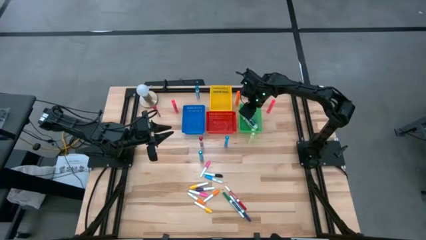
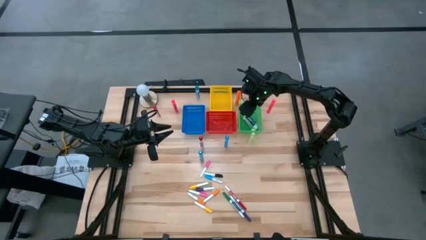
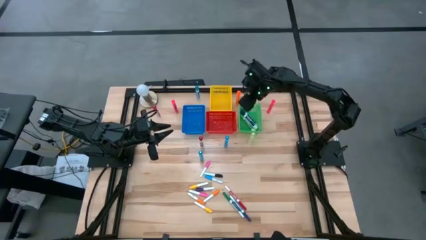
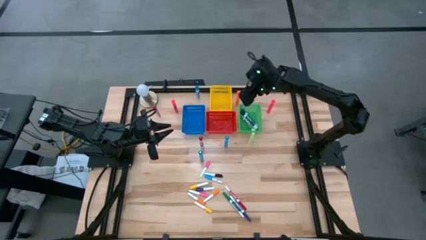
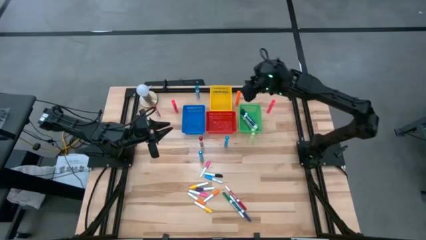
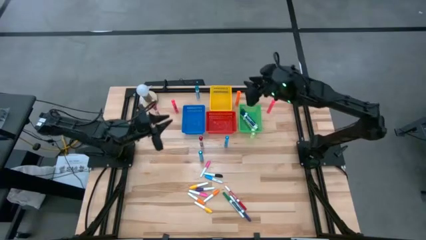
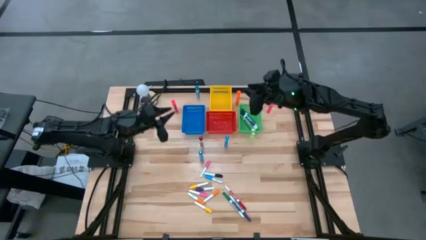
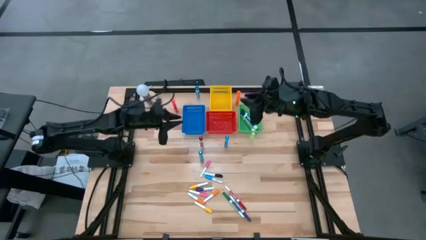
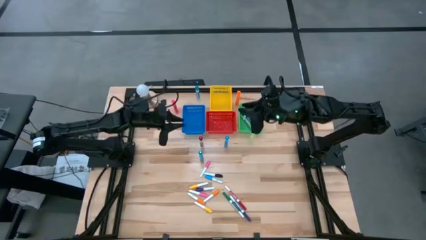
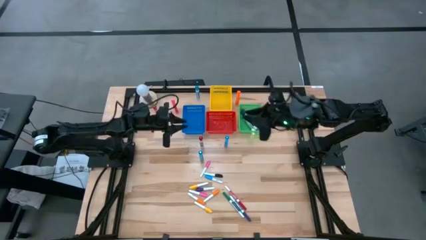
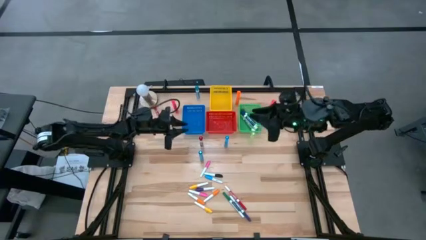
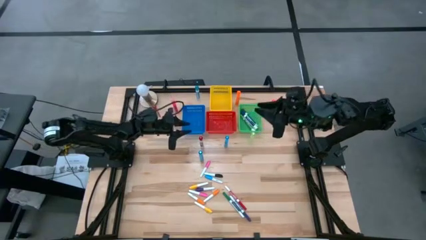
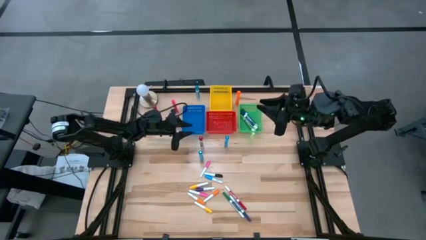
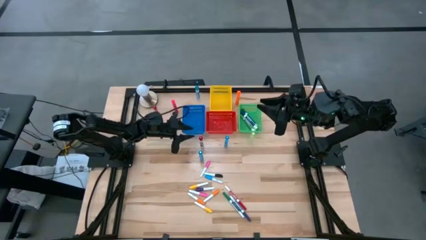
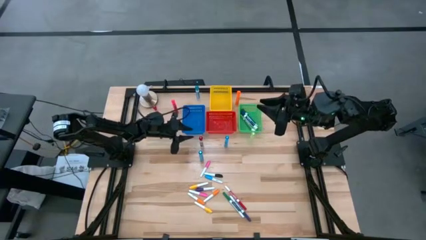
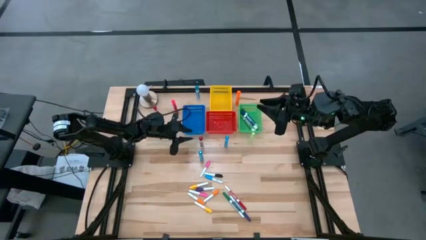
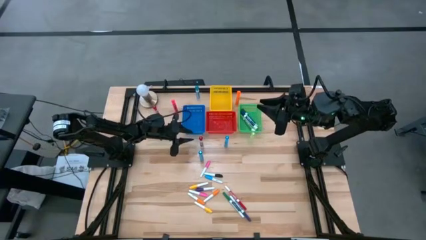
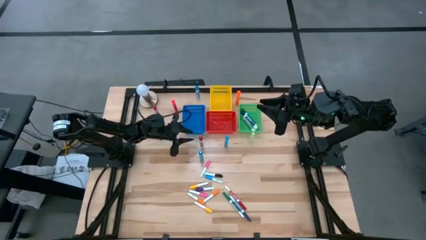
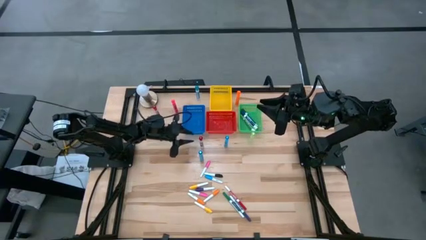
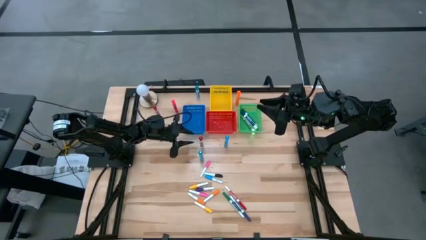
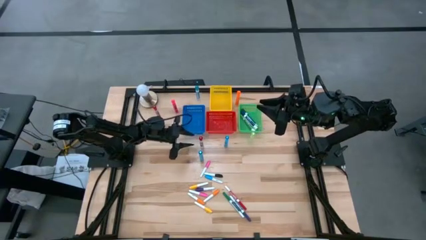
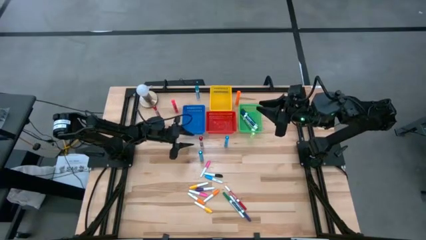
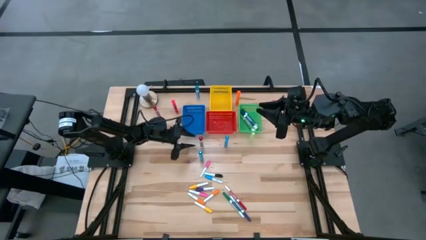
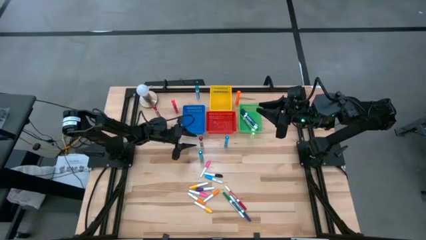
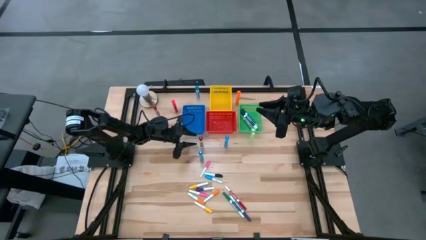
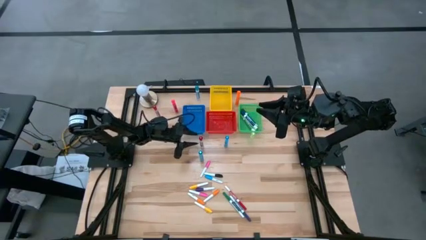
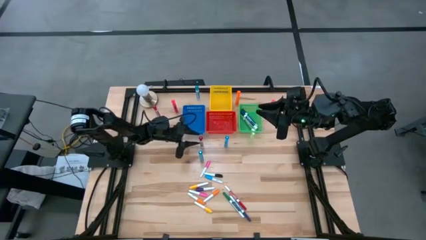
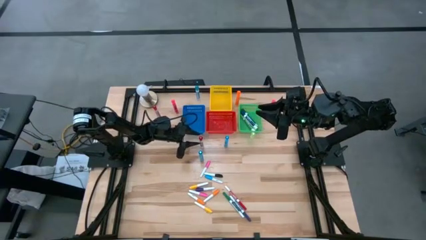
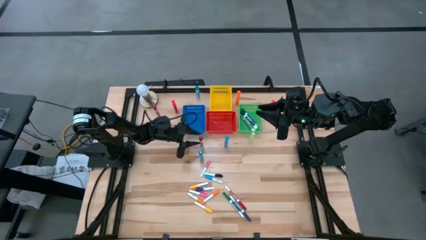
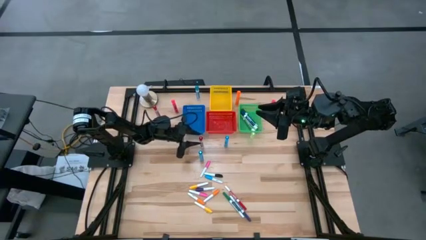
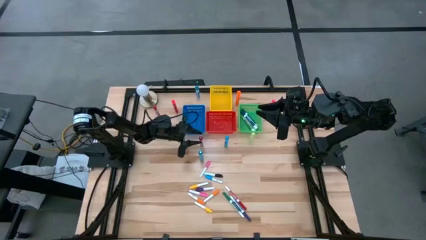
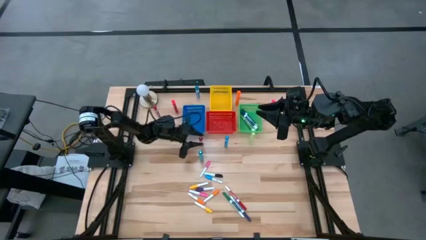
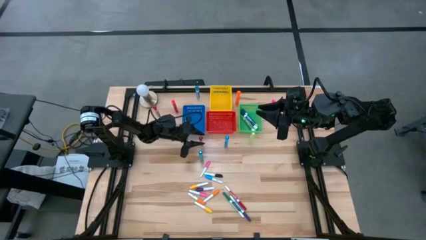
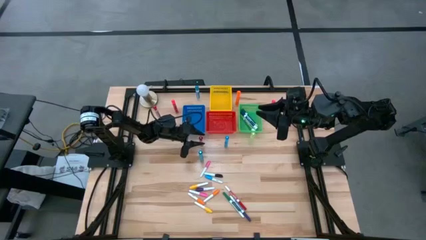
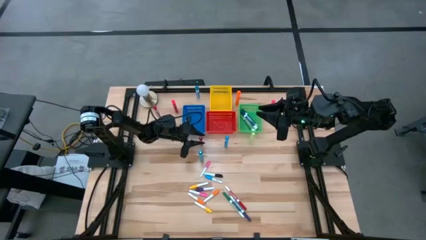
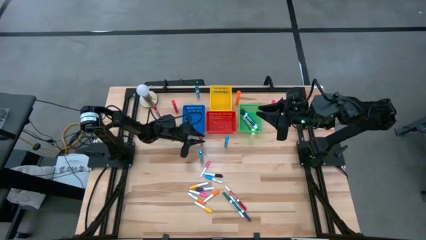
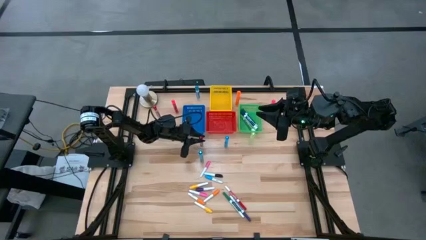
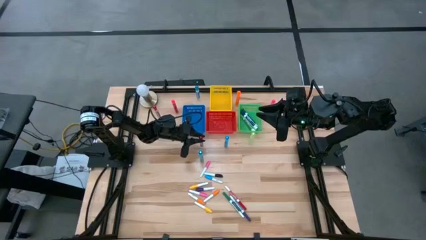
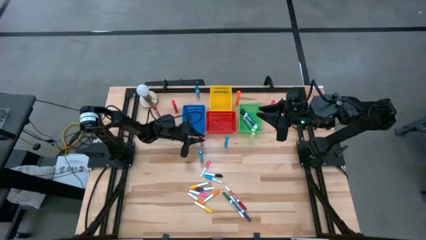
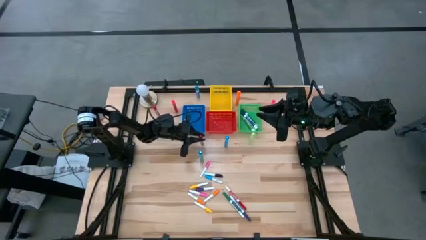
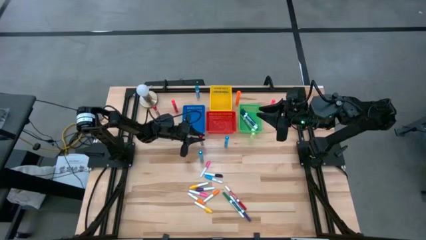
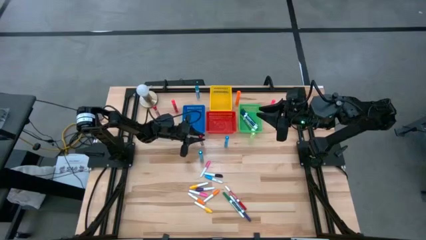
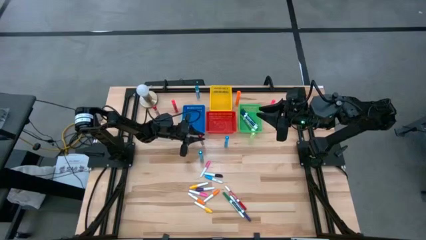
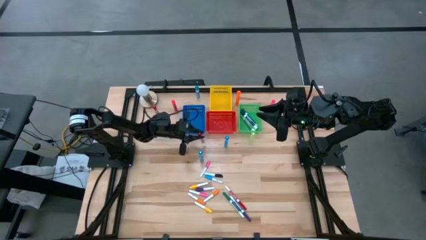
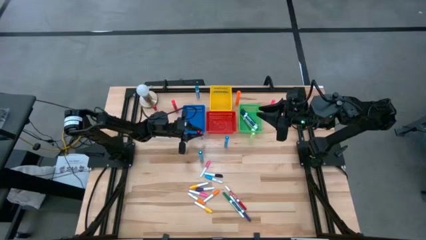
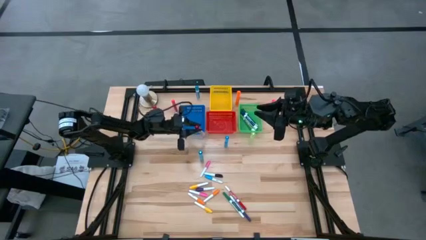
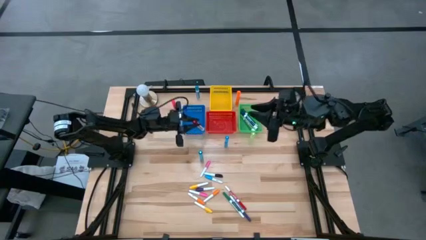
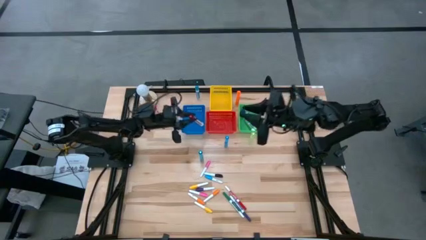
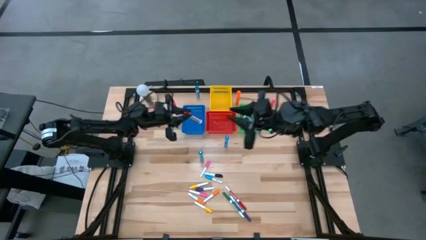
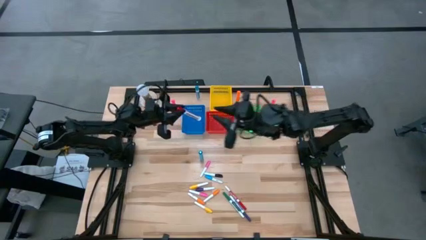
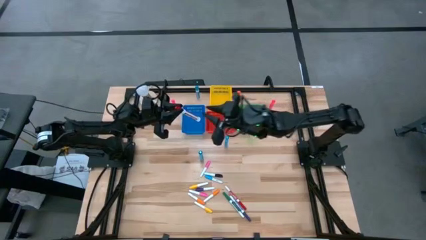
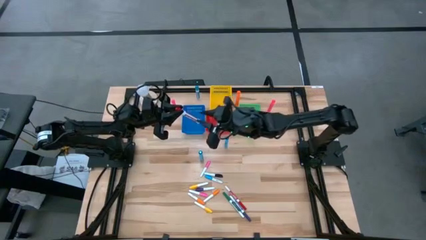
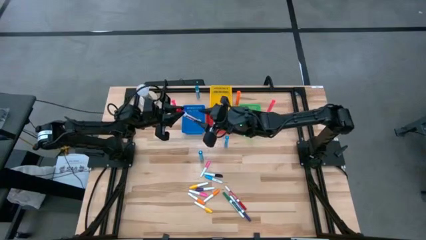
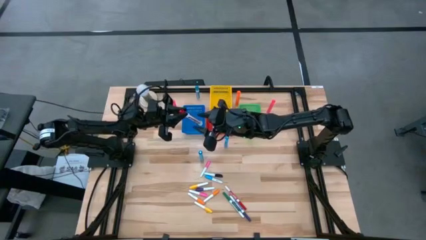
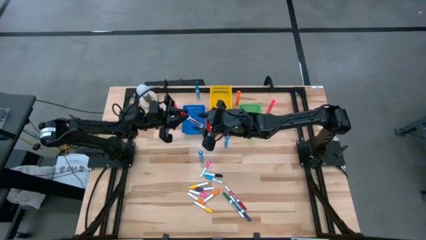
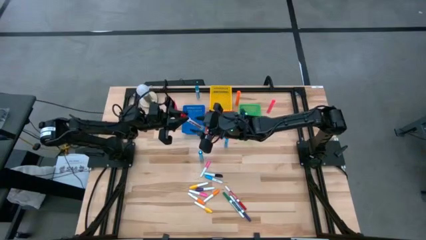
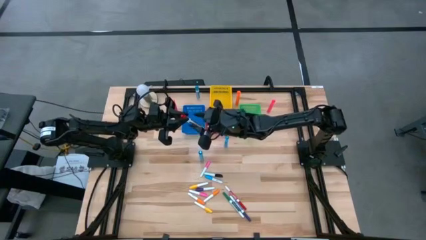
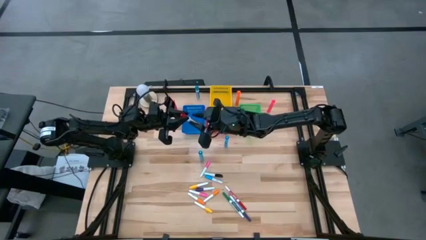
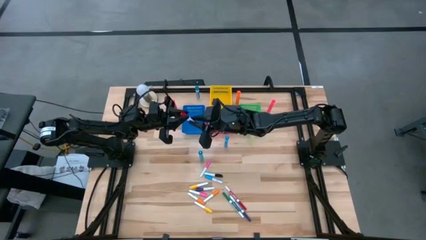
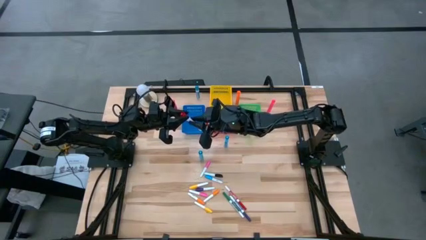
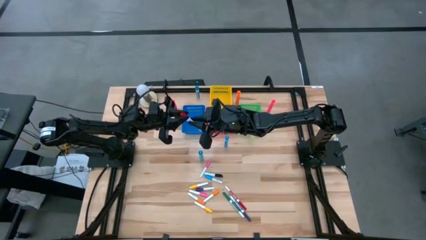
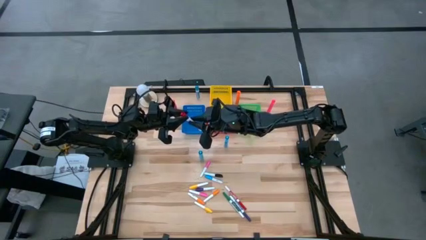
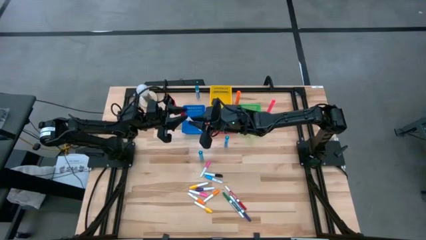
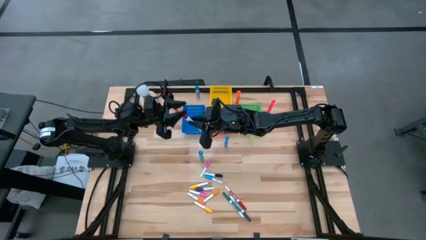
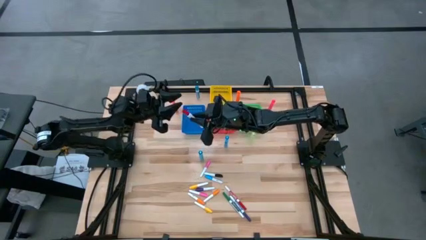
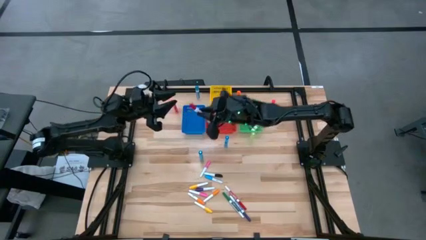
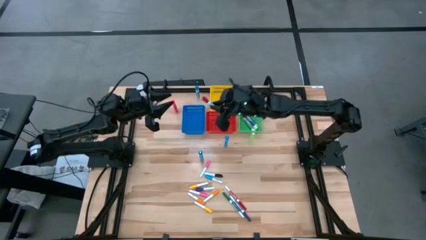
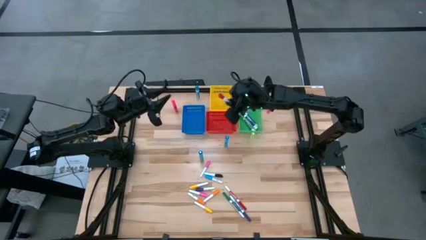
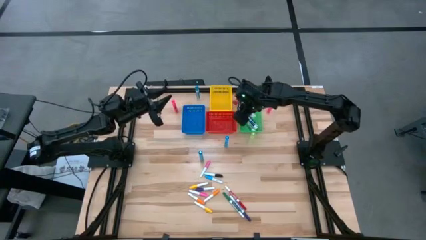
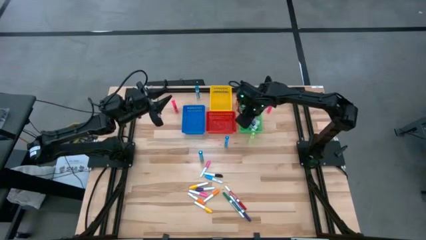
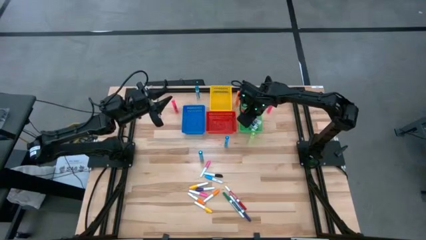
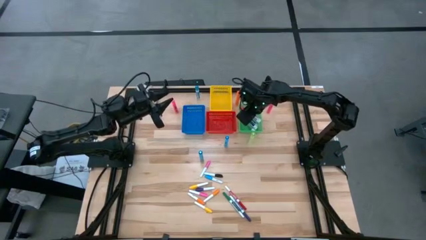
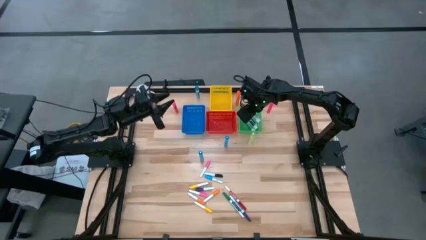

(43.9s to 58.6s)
Task: Pick & Place Markers
Put the large red marker pen into the green bin
